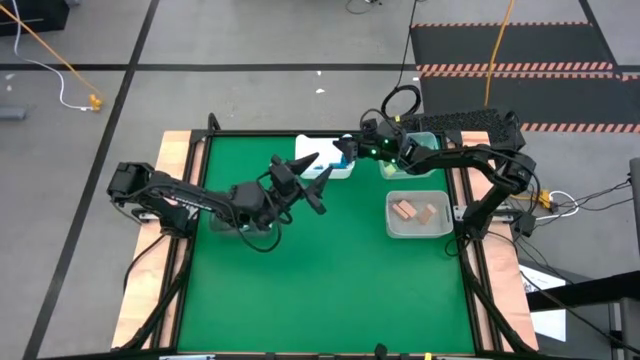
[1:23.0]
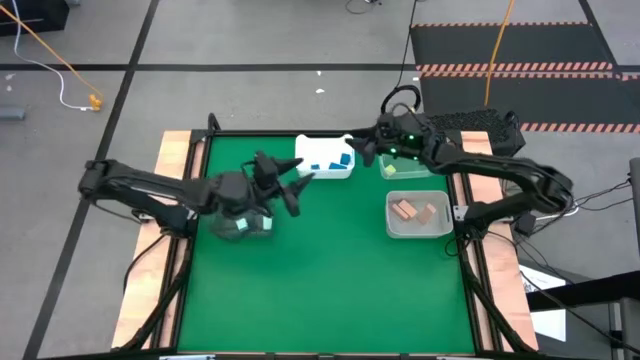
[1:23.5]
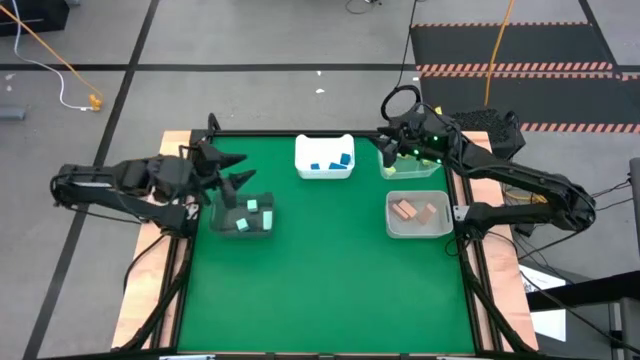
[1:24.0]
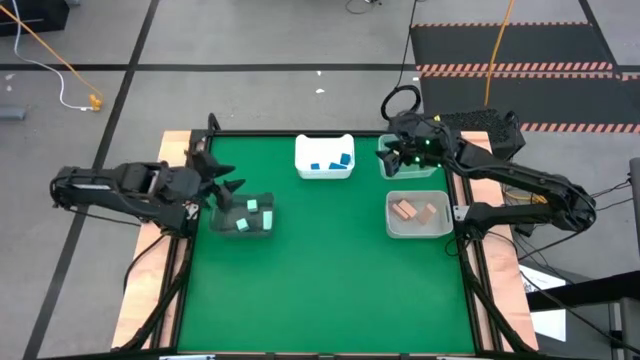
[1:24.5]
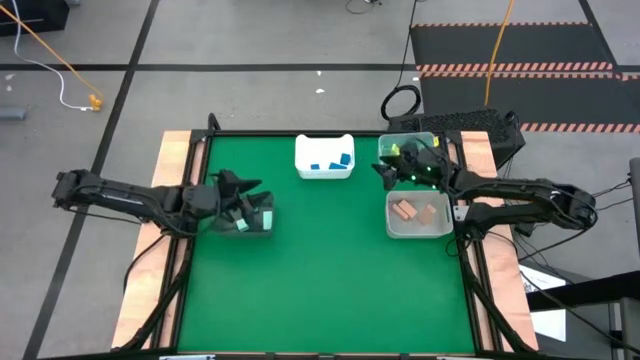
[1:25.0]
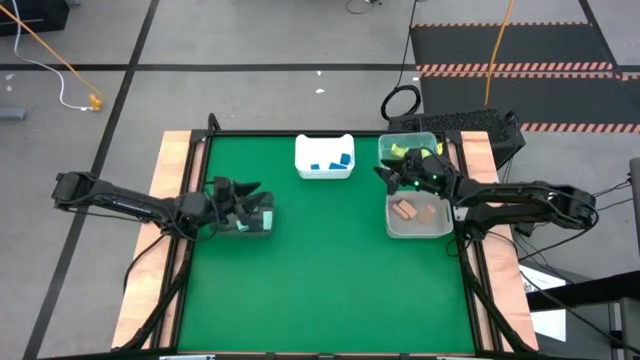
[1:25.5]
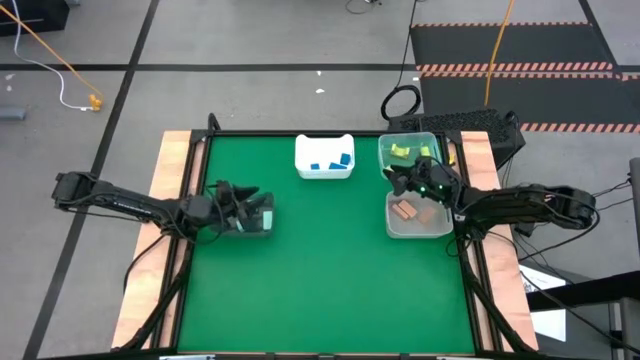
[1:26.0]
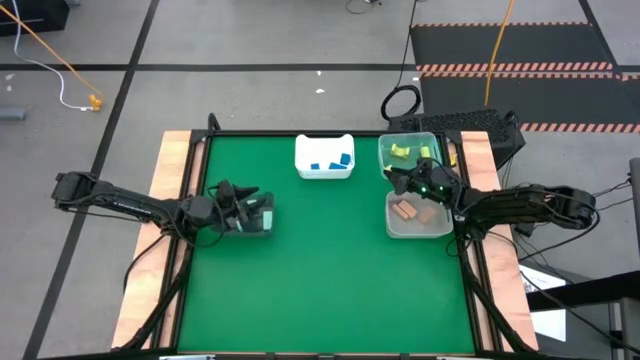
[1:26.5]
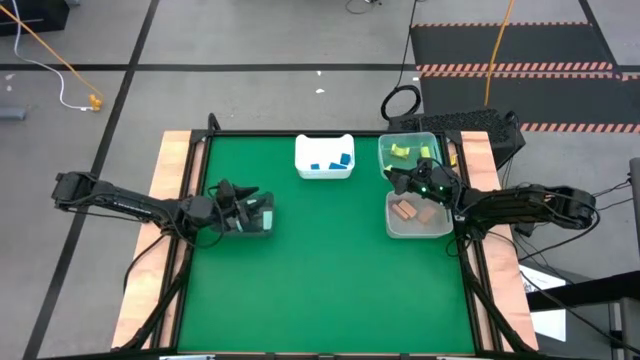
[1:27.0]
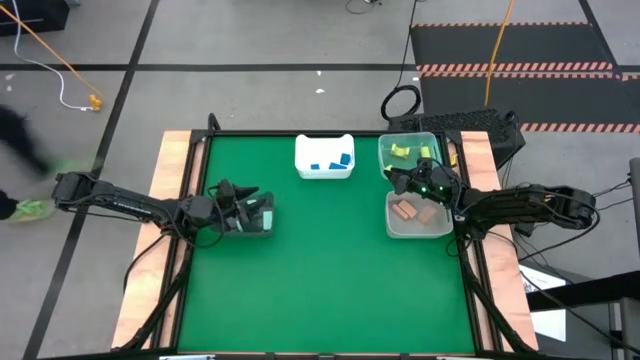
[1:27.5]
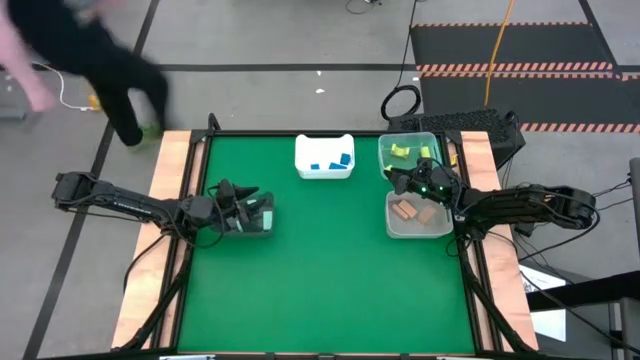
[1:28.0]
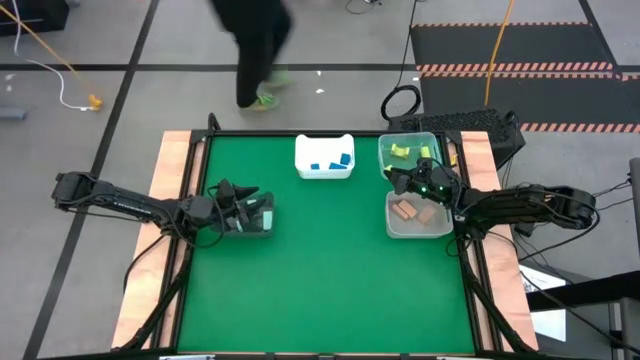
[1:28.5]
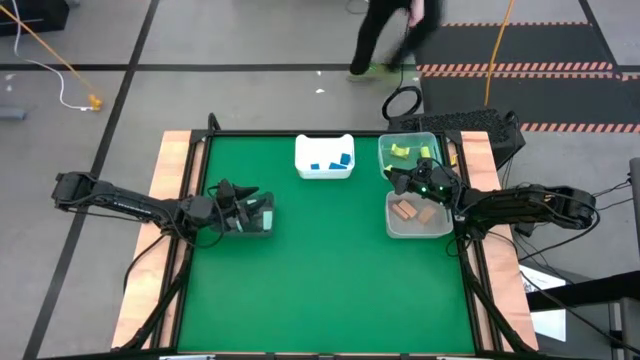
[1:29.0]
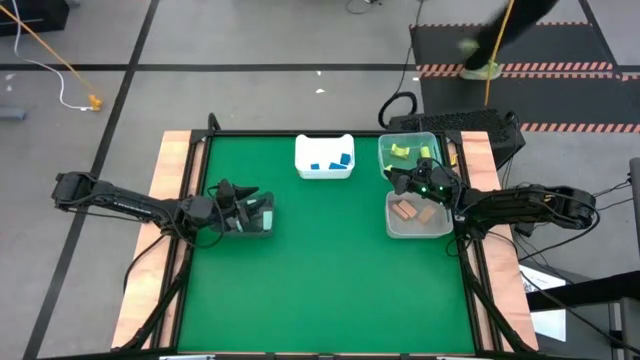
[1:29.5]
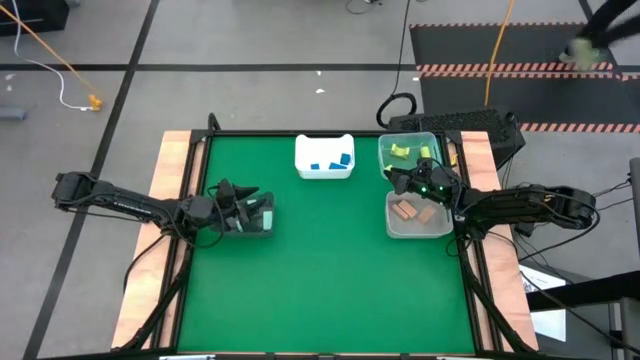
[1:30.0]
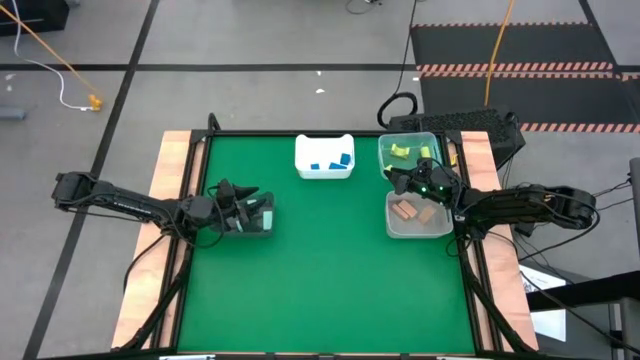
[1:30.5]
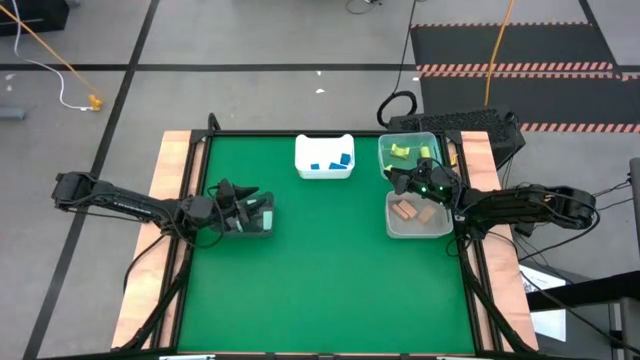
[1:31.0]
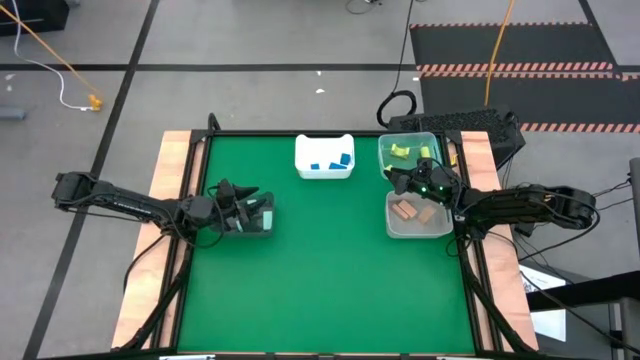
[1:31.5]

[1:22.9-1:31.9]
Task: Sort & place blocks by color
Return to Home Position

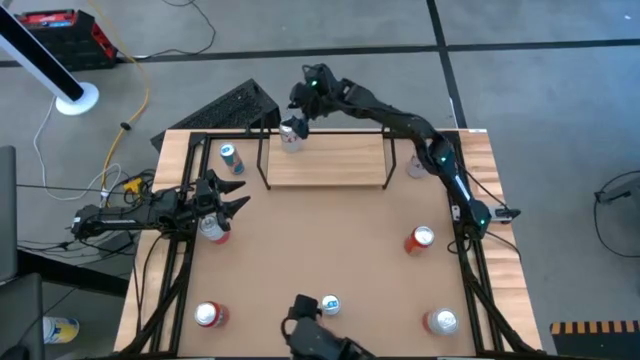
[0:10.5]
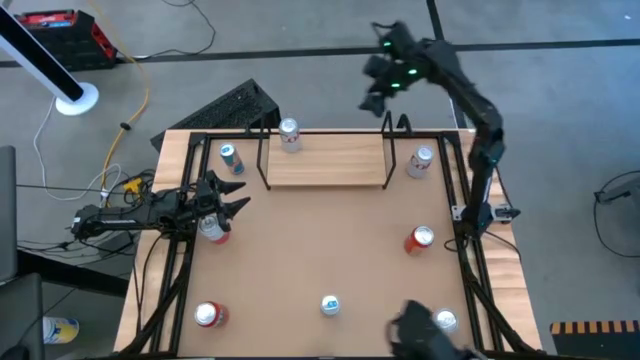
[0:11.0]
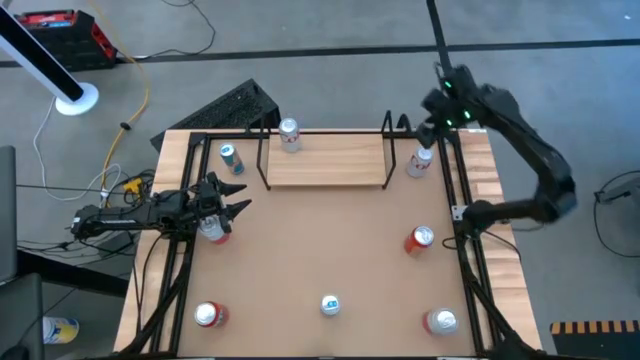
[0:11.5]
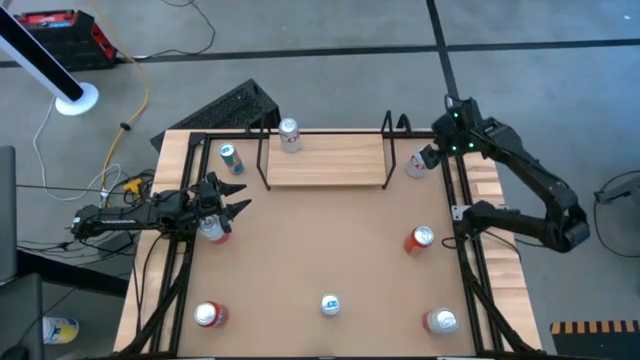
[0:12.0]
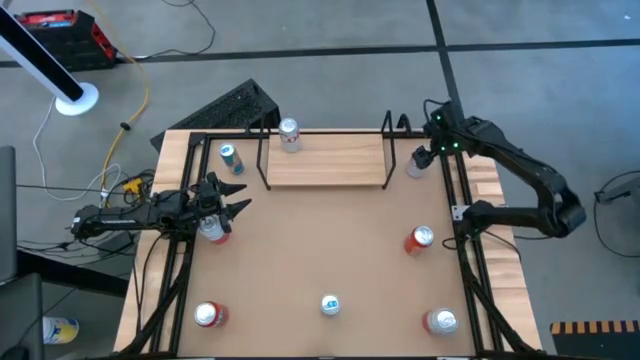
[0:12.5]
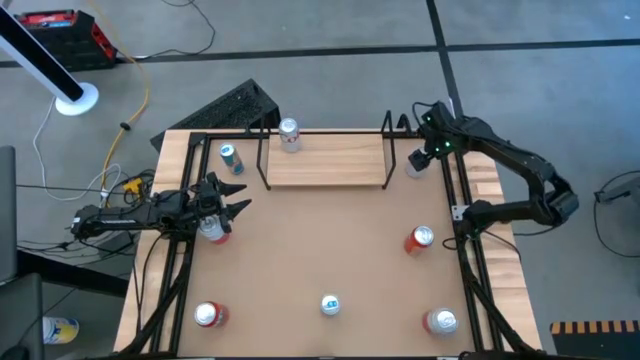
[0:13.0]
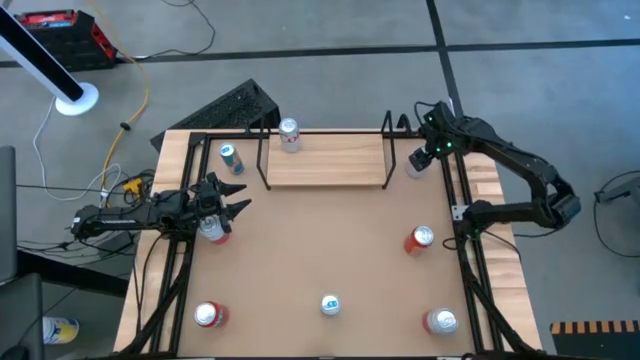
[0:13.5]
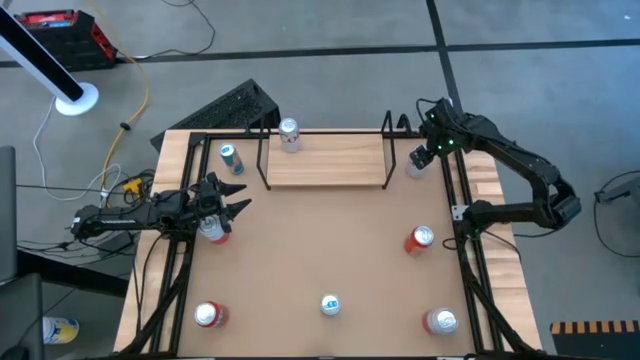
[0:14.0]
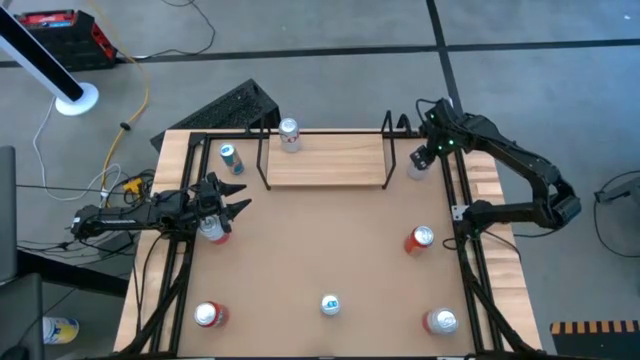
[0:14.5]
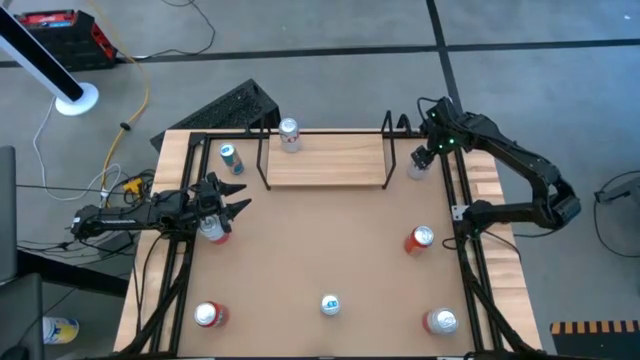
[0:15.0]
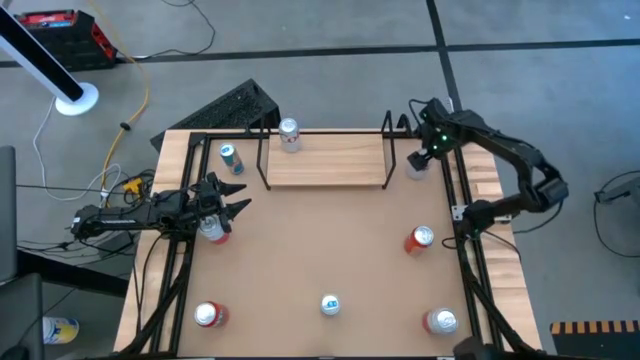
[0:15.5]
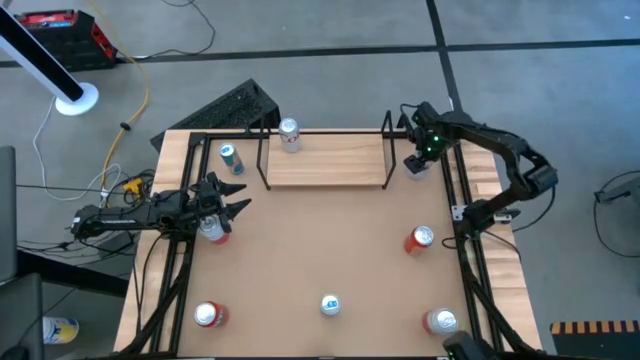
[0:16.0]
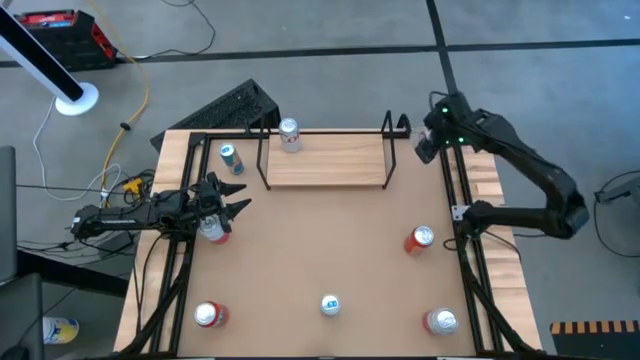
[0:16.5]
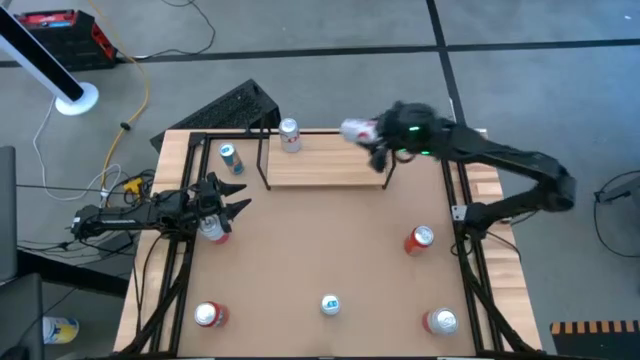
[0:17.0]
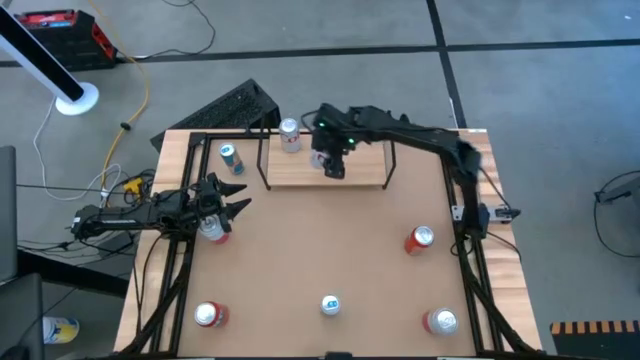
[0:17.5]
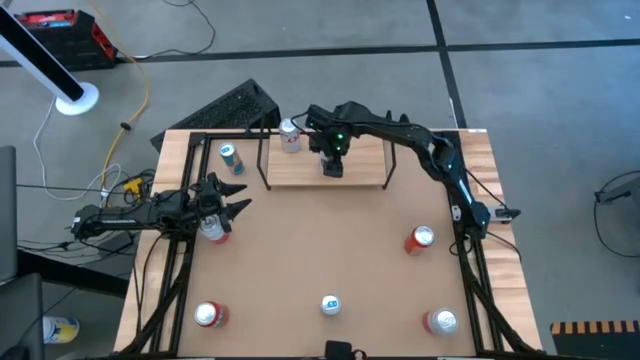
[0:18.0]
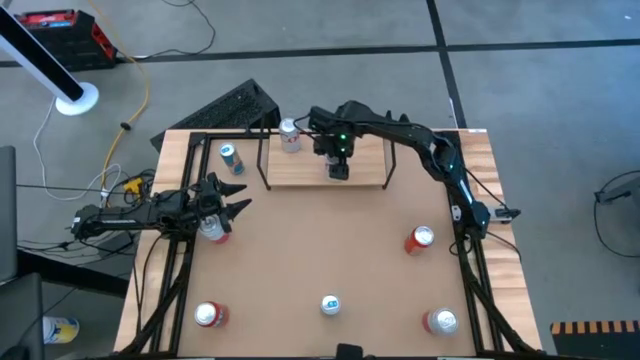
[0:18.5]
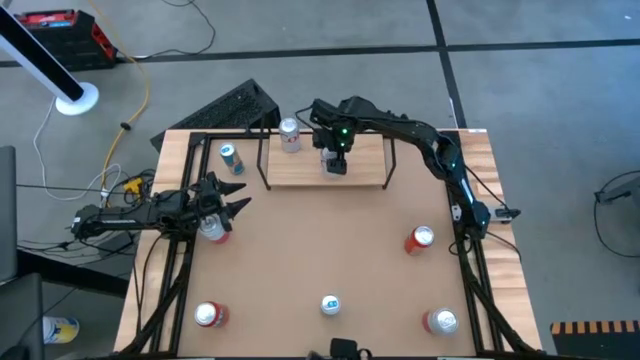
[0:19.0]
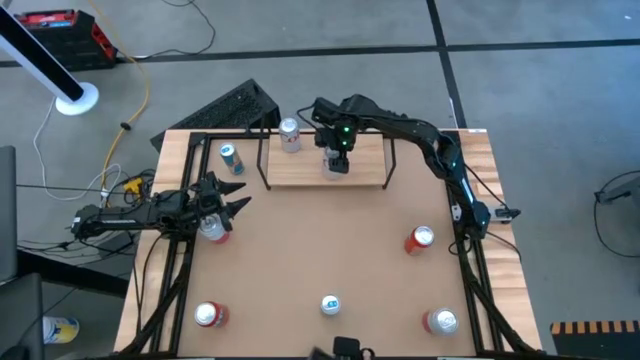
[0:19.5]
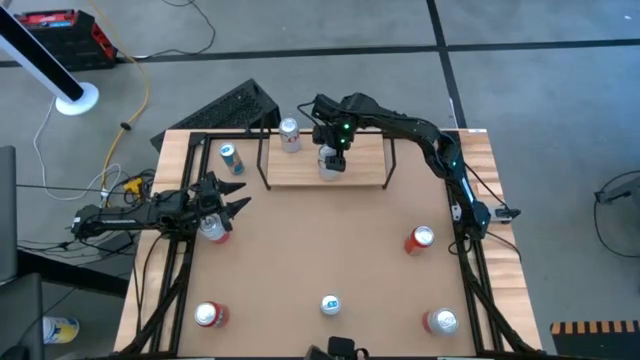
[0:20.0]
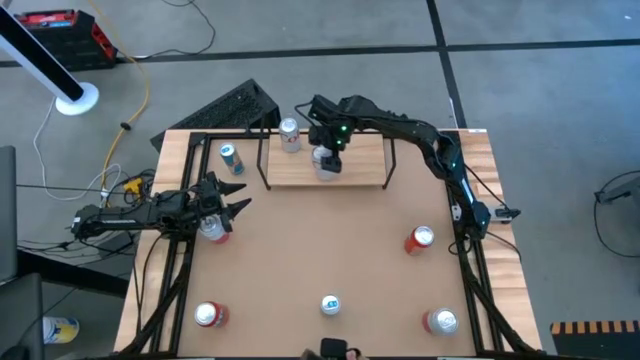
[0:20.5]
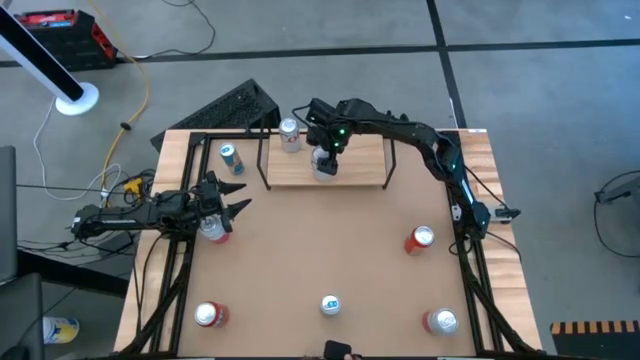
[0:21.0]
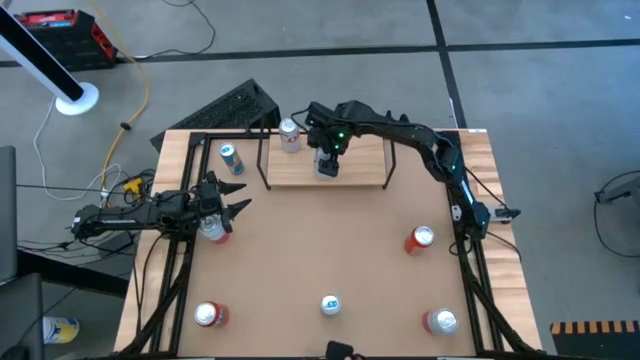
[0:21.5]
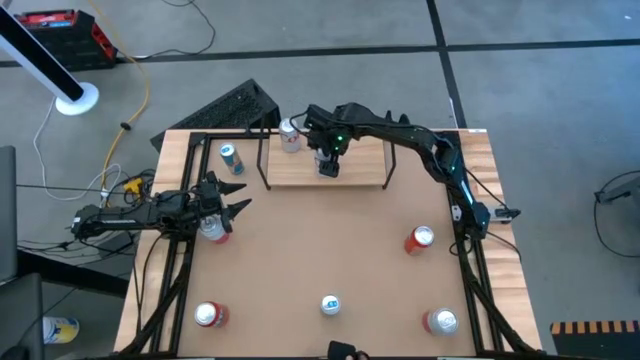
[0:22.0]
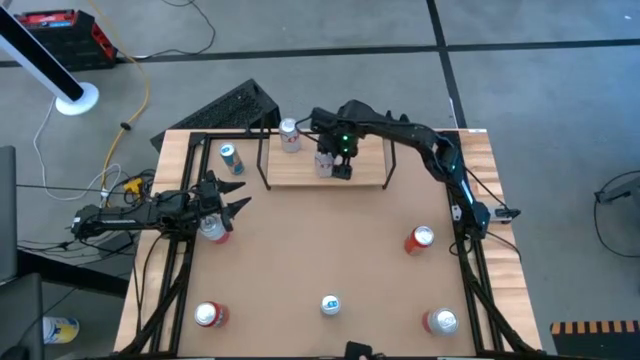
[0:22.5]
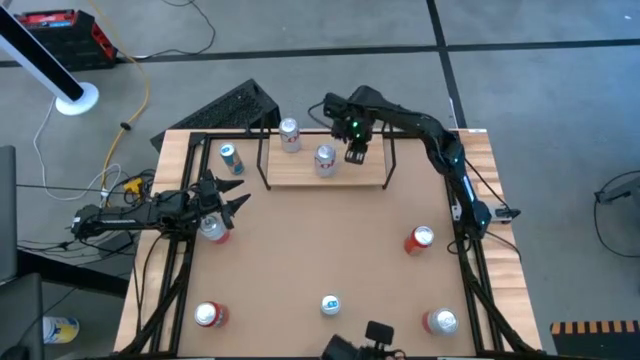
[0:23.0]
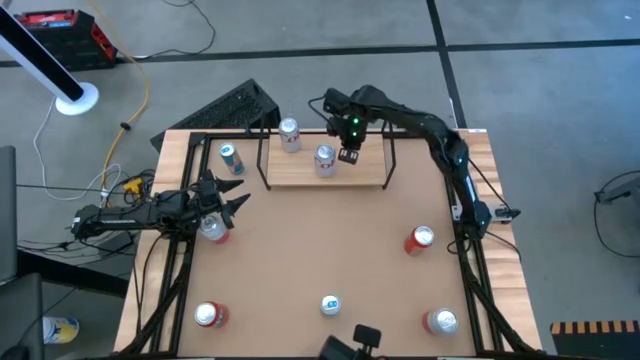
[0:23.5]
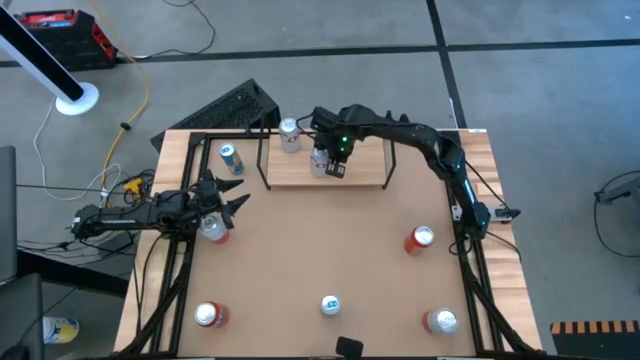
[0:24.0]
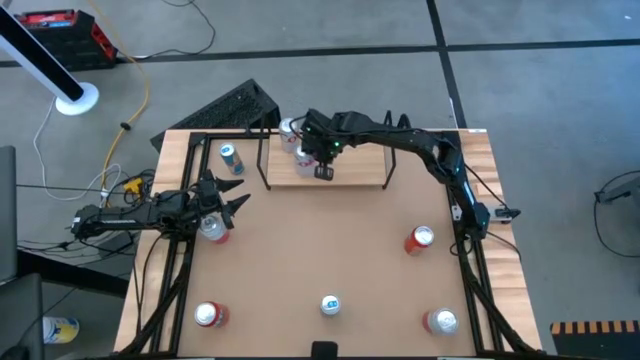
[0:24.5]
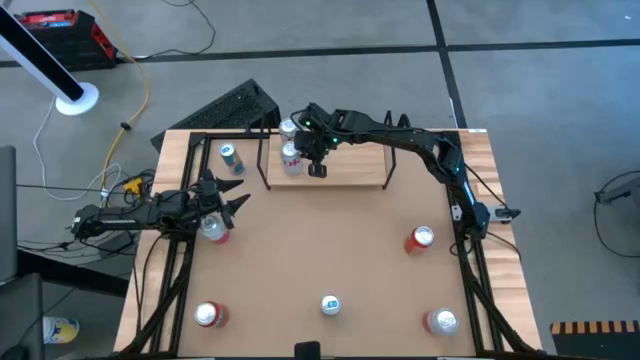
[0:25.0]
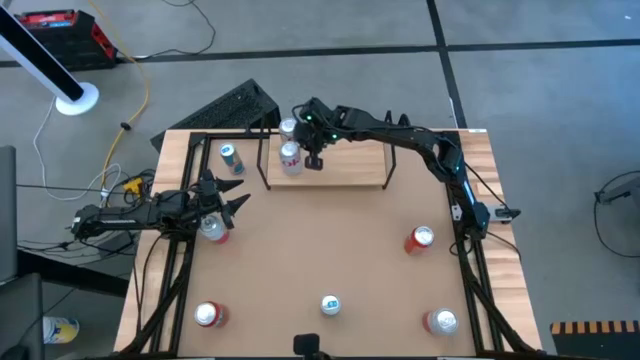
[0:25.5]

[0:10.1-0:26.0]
Task: Place canned beverage on shelf
Put the white soda can on the shelf aligned with the other white soda can
